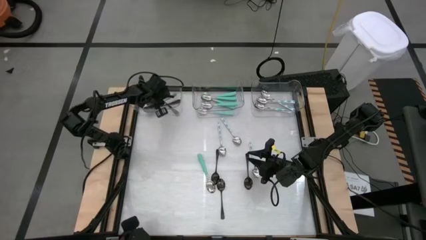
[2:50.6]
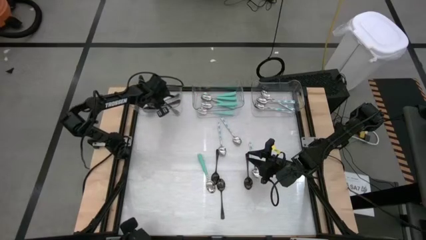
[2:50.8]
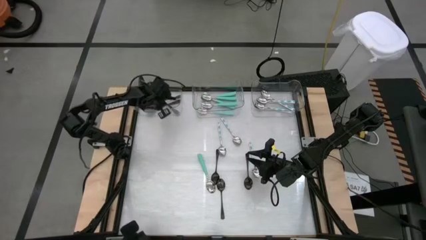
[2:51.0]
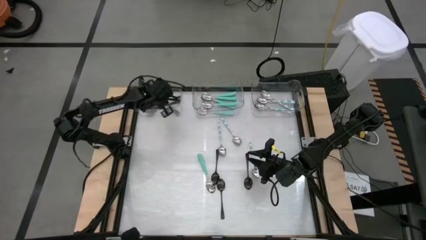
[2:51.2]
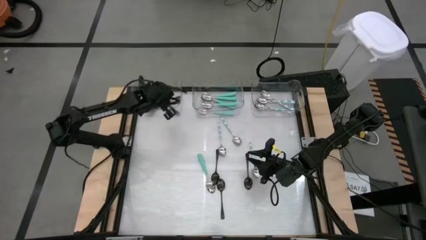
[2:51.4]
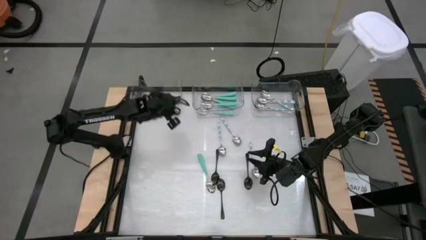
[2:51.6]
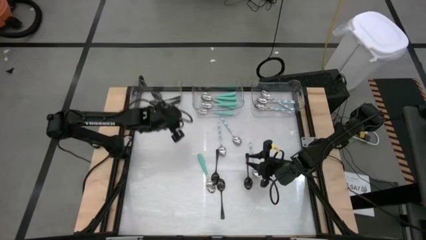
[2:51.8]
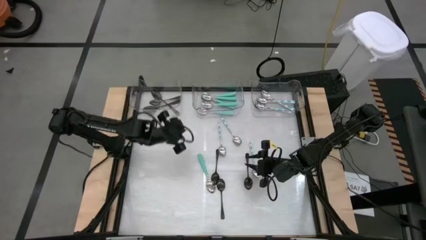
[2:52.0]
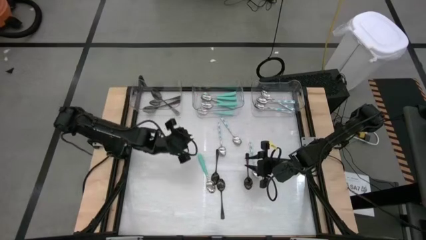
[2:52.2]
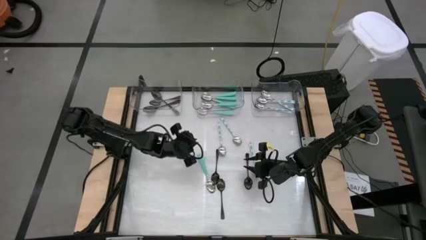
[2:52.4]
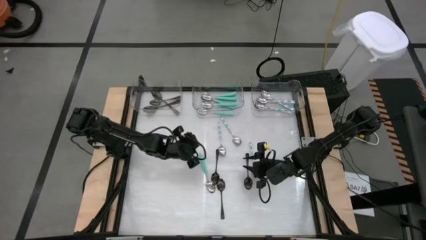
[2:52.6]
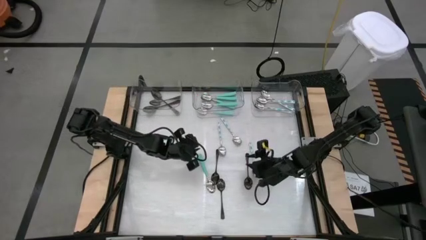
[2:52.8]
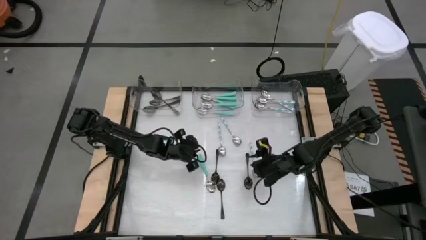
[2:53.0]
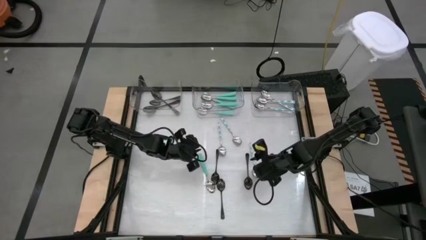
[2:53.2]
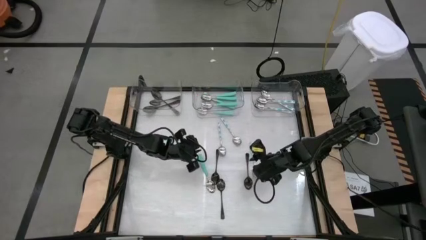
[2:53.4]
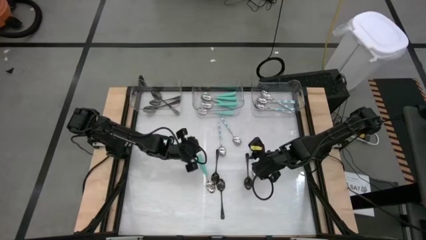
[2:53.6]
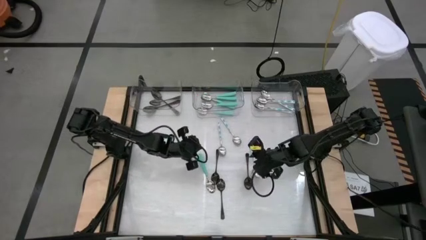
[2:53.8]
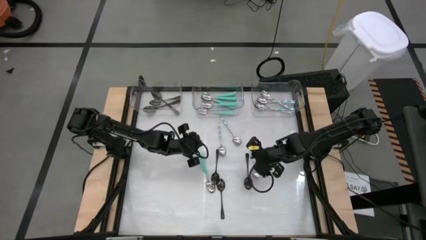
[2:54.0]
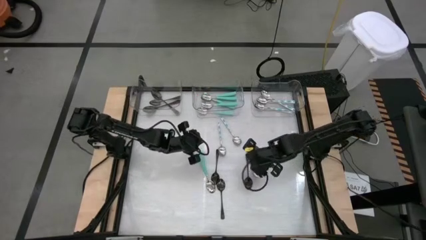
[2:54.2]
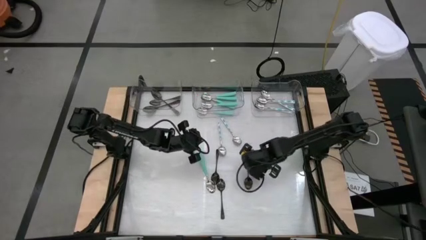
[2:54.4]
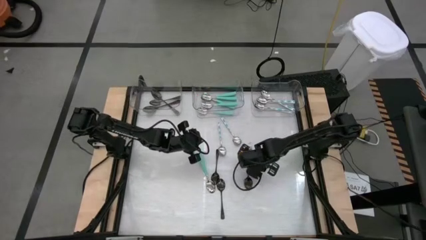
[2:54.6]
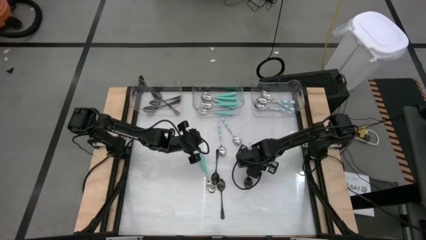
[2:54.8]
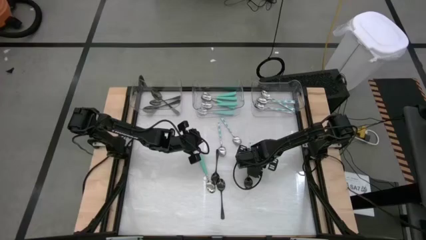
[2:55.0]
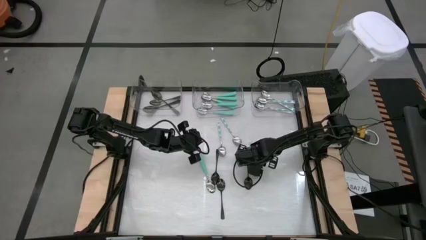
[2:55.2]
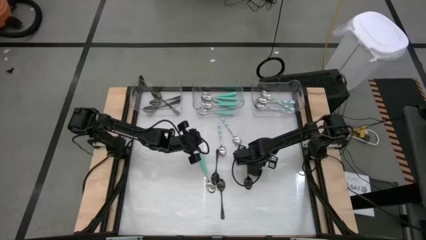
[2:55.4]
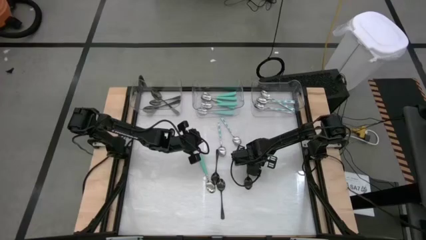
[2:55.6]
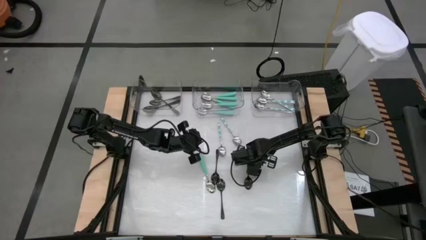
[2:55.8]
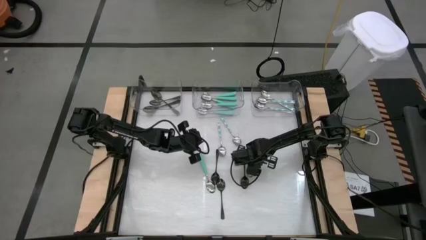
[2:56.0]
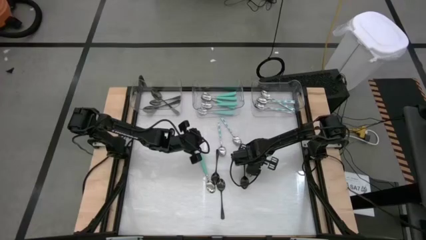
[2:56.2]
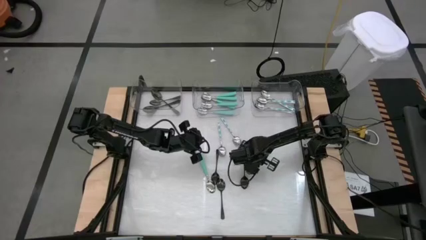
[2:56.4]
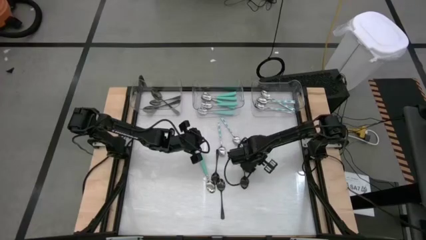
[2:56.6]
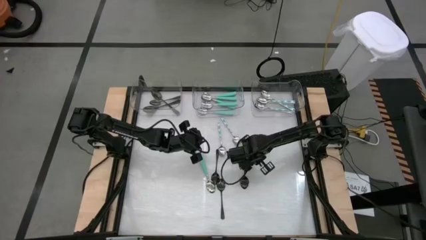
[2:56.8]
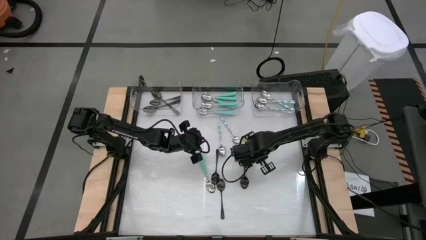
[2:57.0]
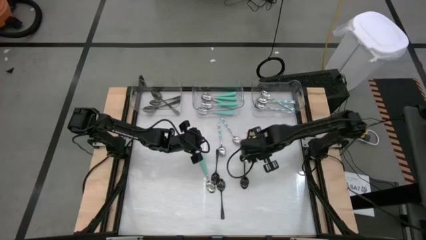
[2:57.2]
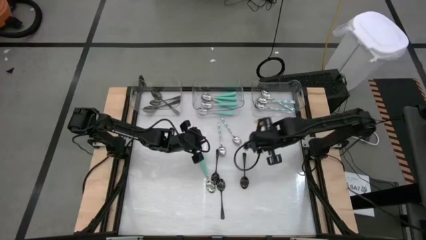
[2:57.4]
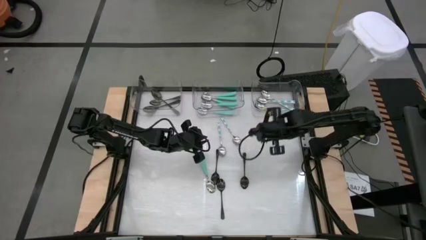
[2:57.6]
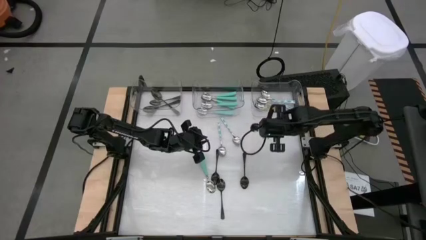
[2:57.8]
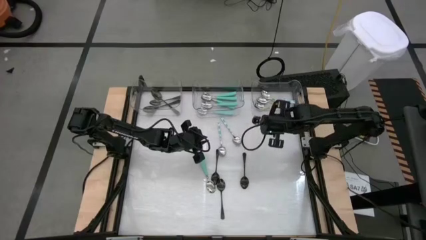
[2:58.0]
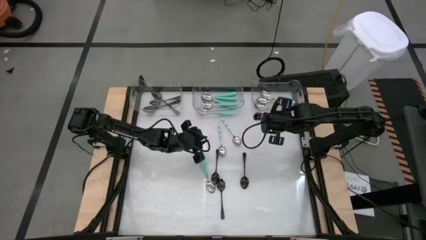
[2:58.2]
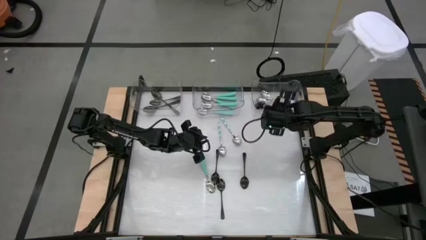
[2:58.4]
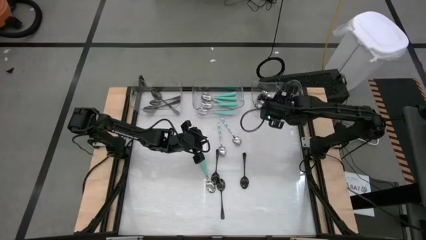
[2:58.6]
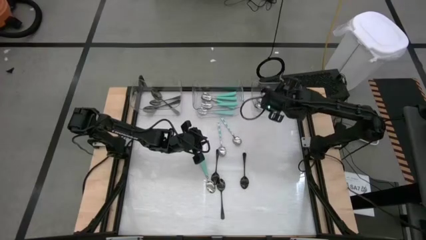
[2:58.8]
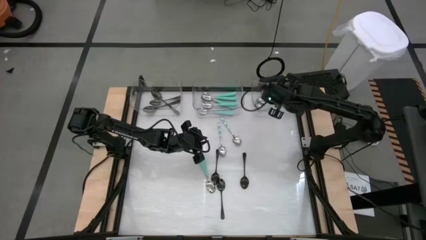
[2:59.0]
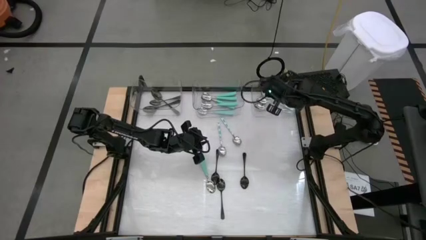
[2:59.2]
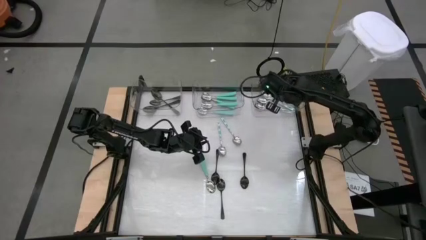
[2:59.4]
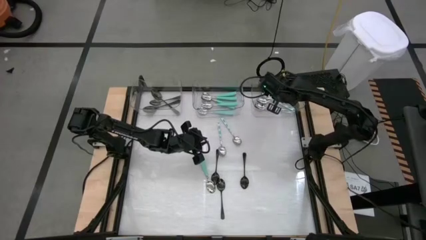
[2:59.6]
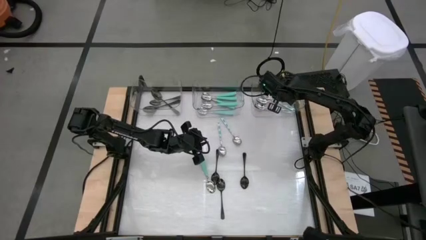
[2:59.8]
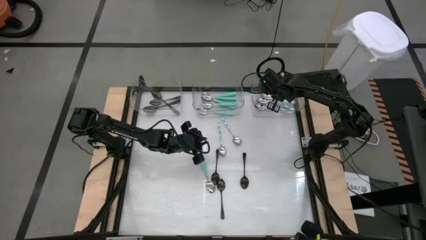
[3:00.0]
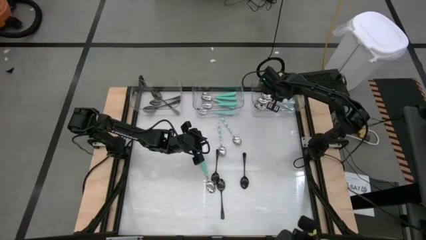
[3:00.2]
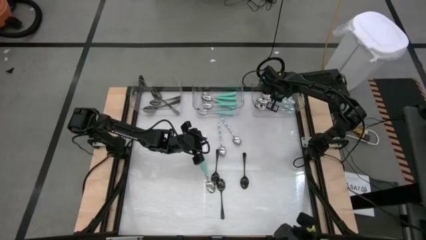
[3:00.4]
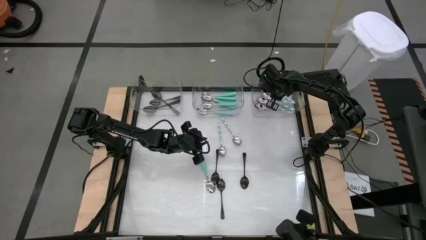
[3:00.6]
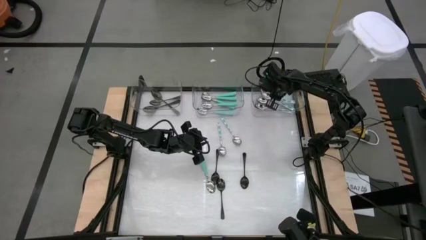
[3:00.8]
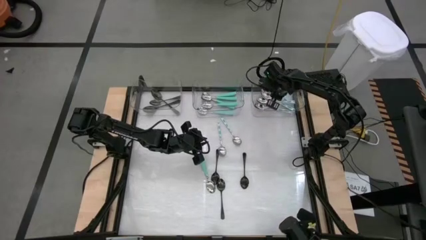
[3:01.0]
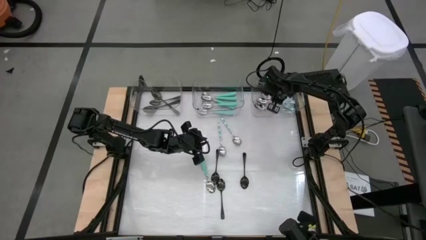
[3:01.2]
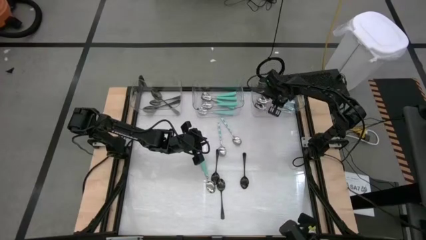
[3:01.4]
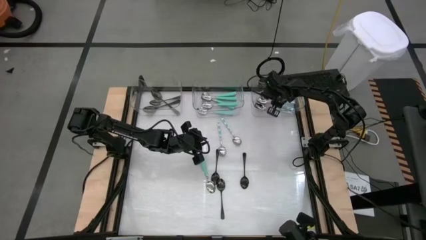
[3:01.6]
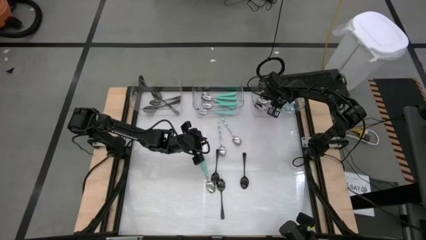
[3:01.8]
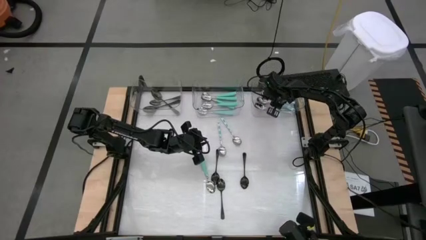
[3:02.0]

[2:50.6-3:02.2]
Task: Sort silverware by color (type)
Put the green patterned spoon into the right transparent bin
